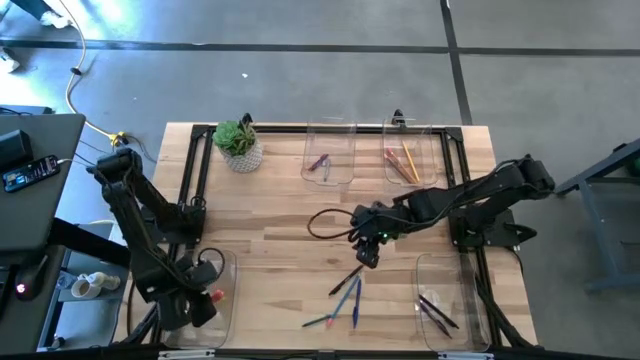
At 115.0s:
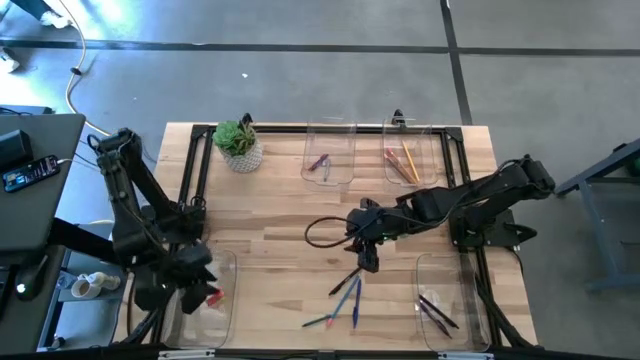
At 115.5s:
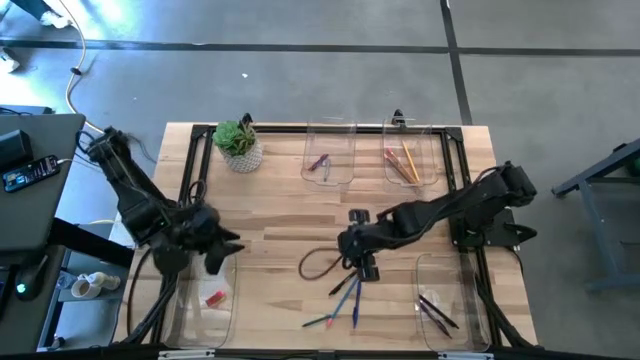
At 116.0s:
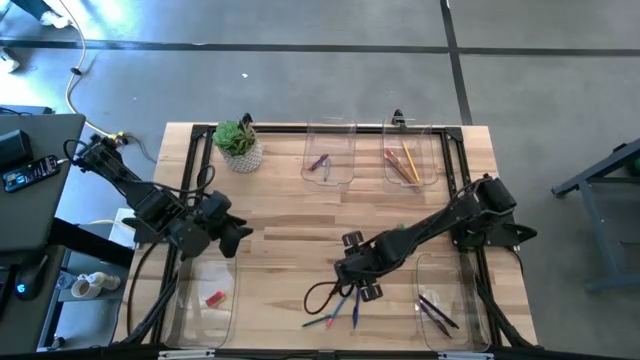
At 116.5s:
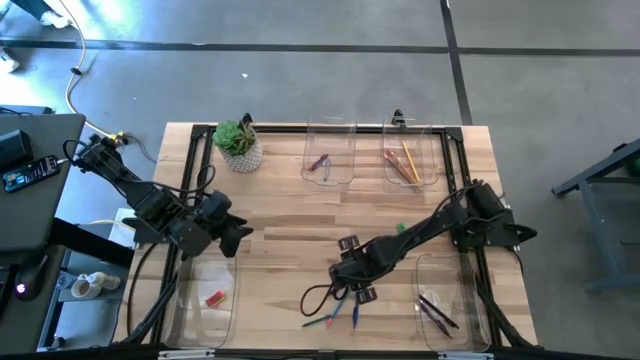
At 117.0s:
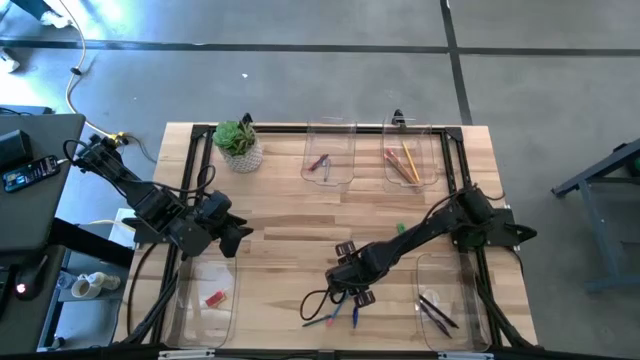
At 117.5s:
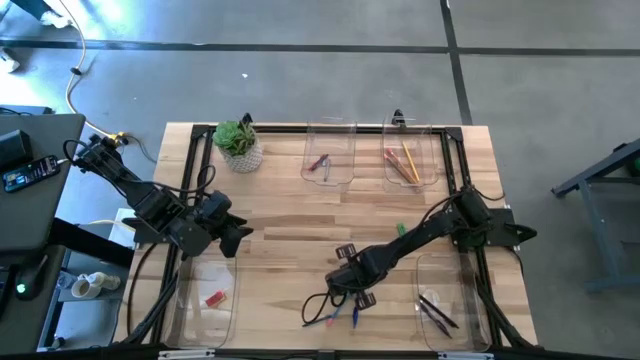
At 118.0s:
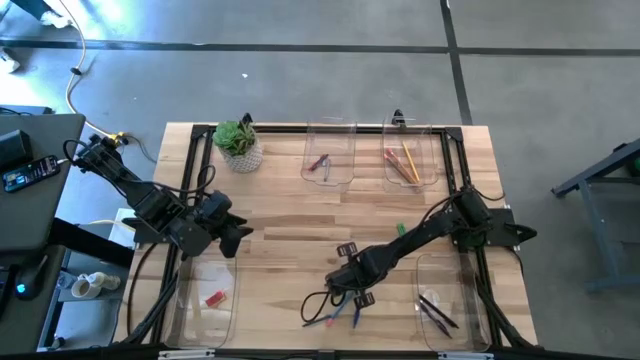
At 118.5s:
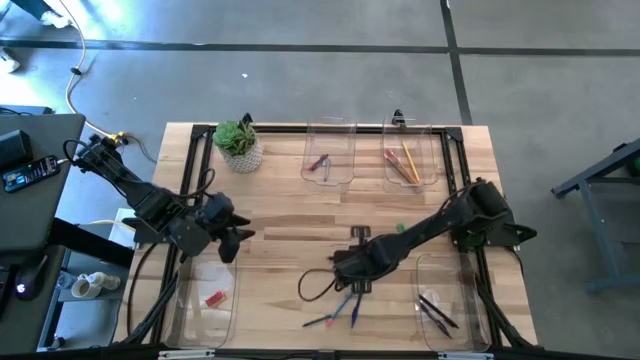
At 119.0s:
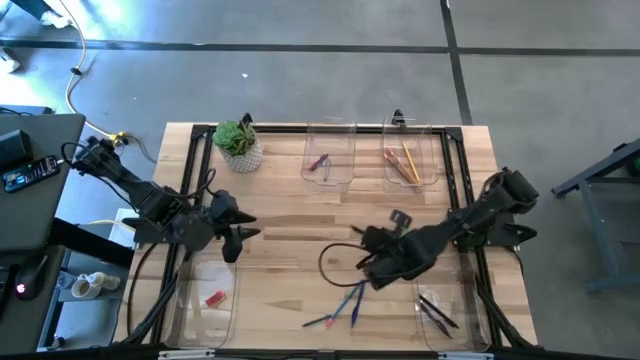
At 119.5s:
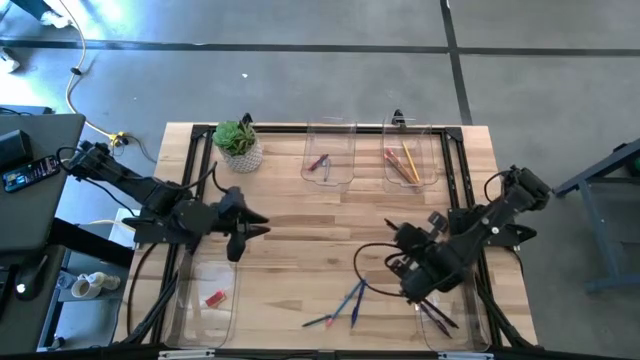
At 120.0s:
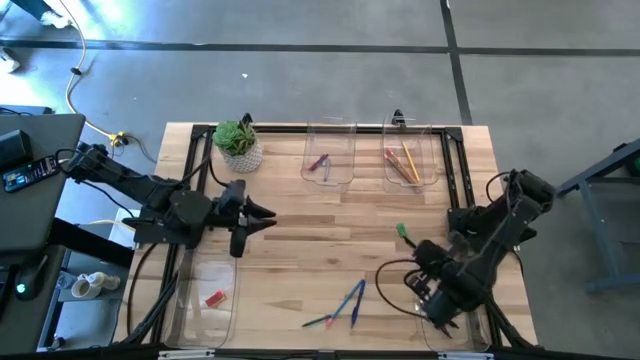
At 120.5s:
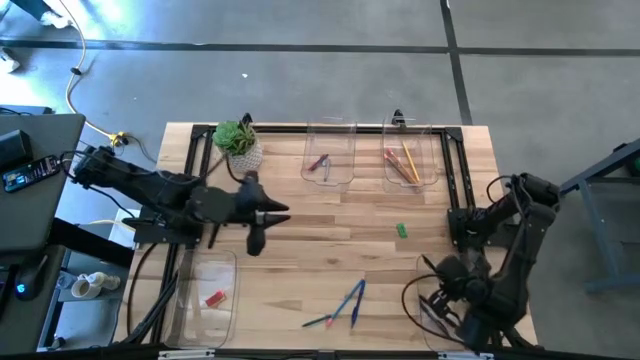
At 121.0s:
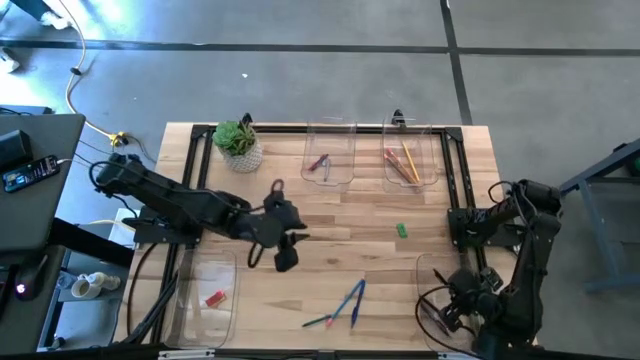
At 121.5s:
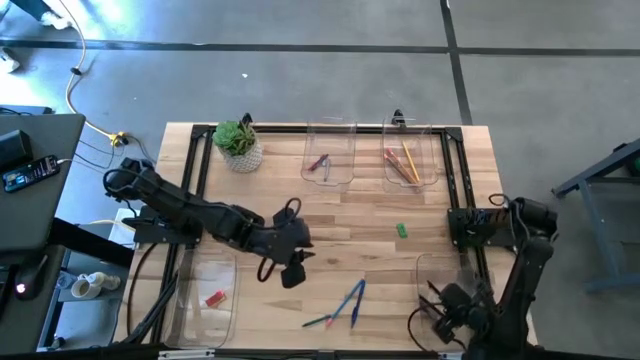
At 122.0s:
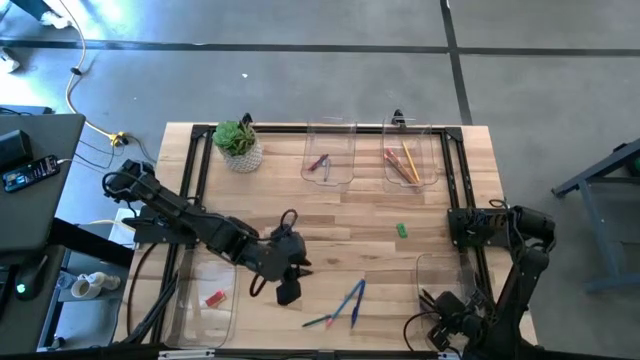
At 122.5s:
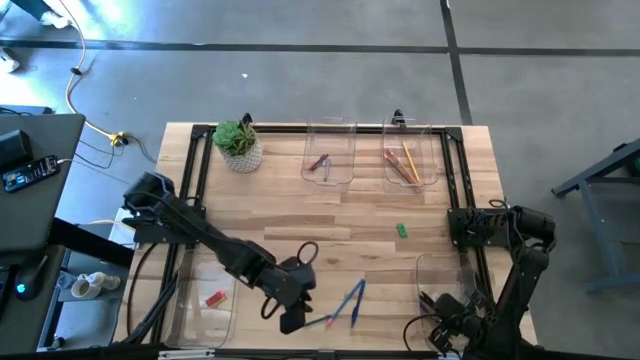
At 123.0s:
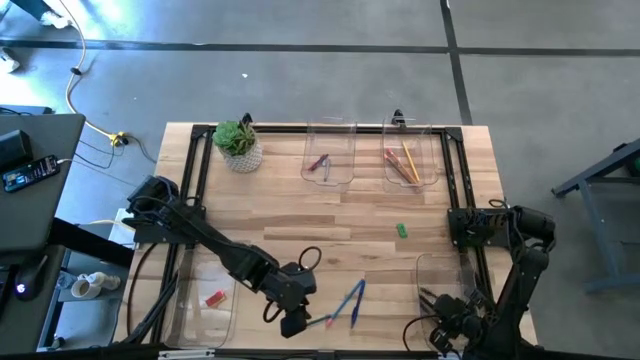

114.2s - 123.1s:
Task: Sort crayons/erasers/pens/pencils in bins
Put the black pen into the bottom right transparent bin

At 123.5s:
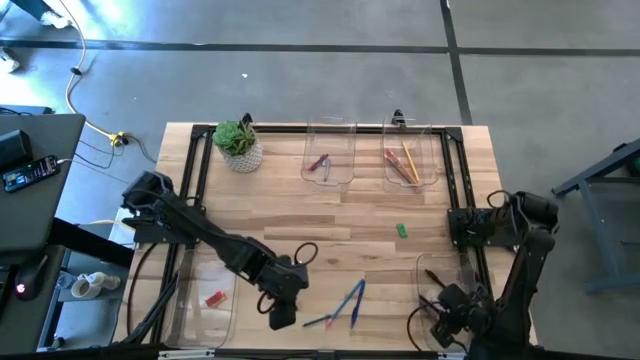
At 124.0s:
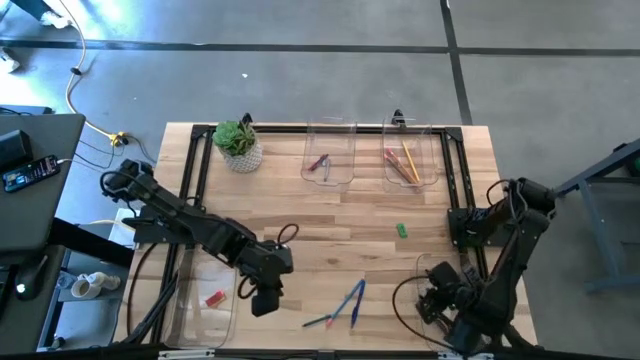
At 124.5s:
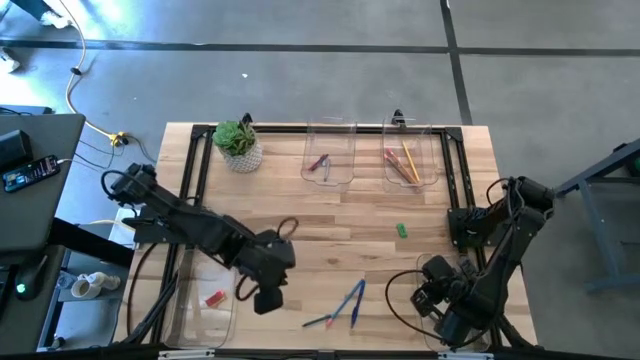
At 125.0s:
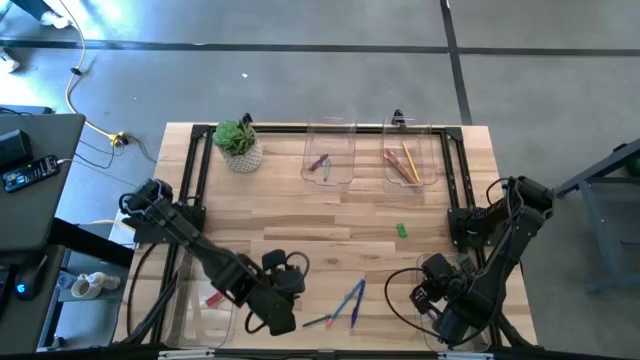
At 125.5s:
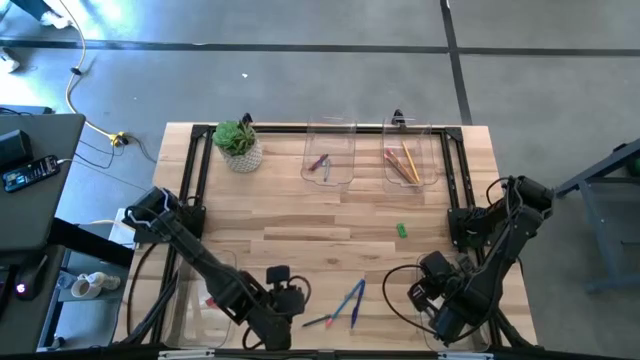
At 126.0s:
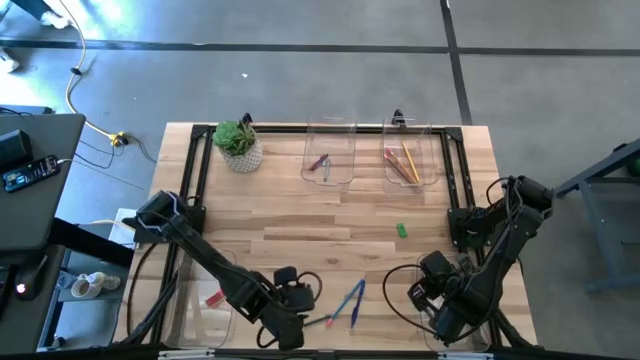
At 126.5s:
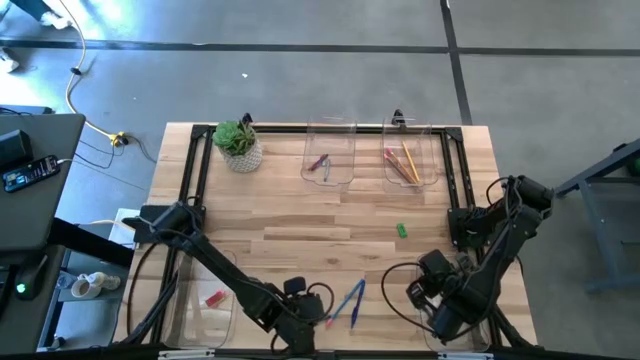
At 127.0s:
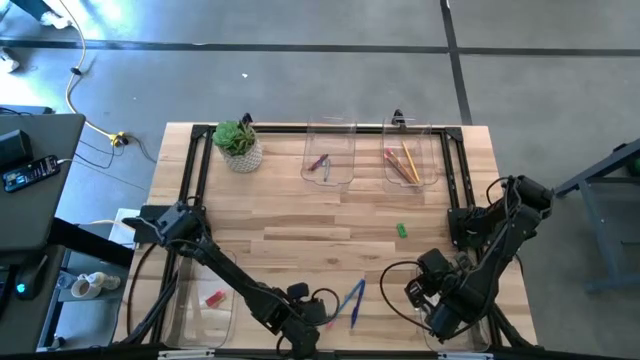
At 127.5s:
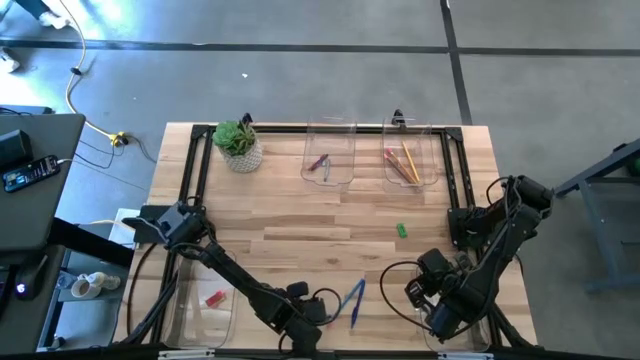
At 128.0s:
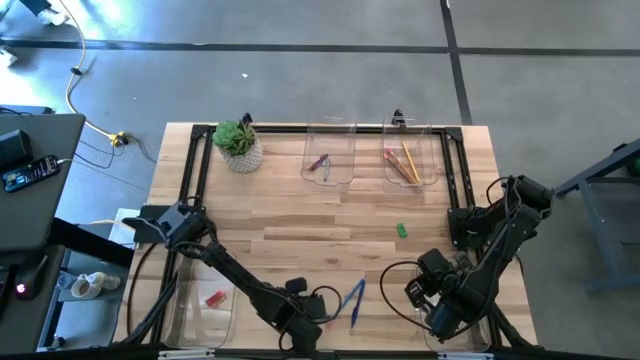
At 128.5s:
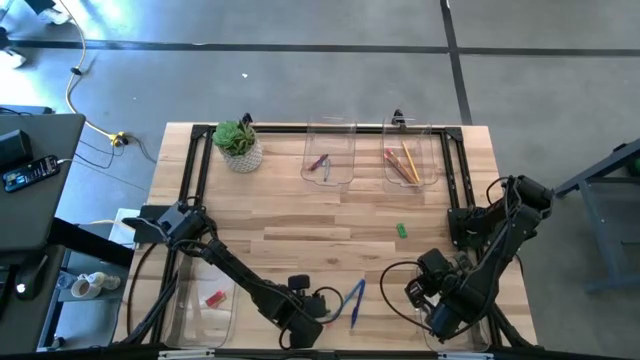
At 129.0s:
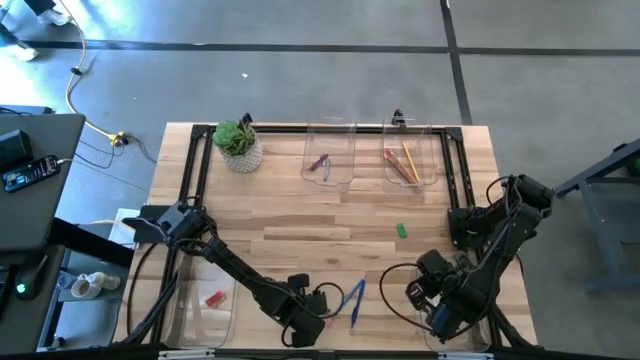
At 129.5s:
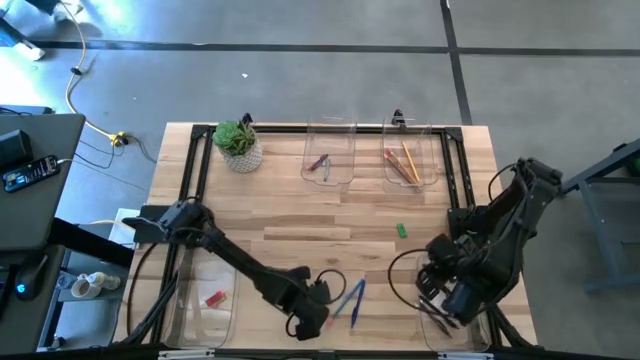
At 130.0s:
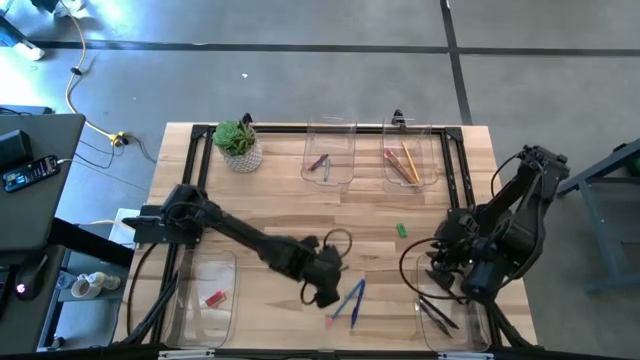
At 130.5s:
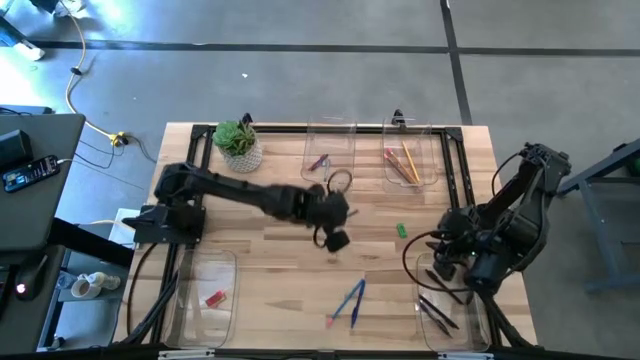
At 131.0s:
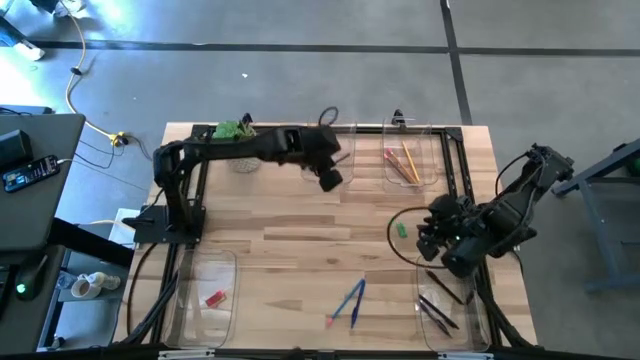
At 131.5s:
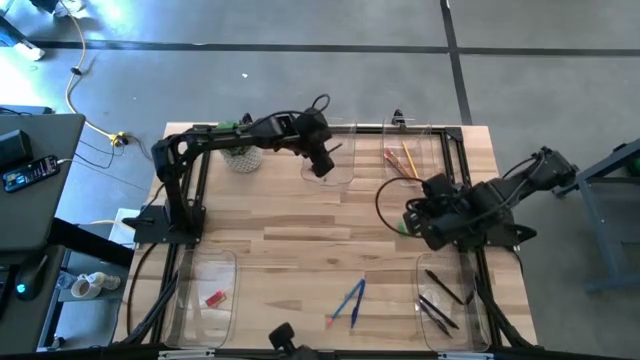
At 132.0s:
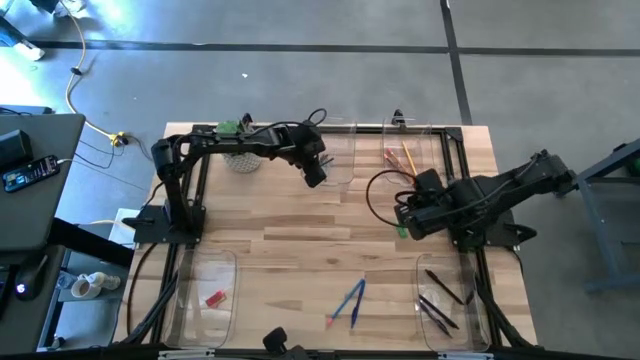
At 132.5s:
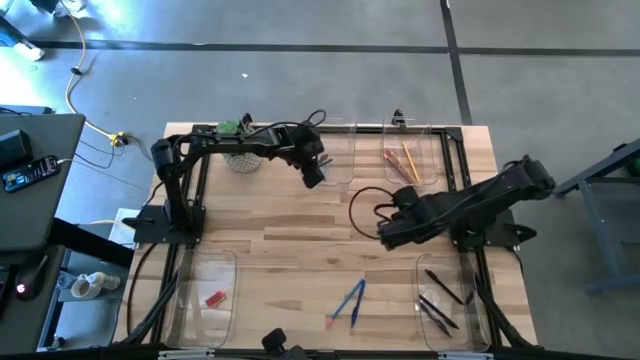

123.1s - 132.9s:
Put the dark green crayon into the top left transparent bin

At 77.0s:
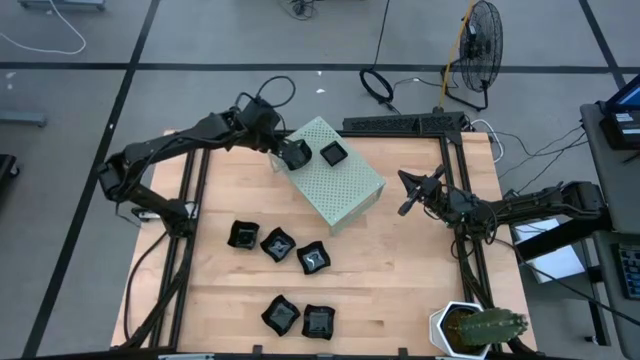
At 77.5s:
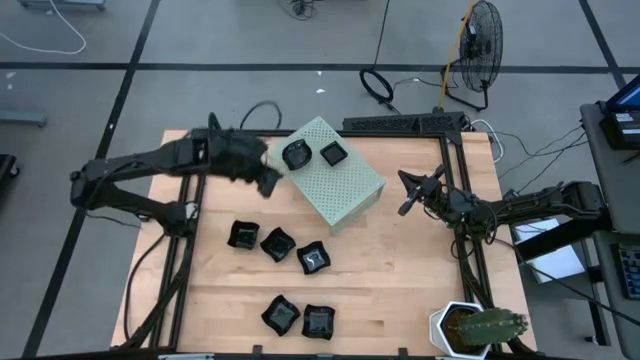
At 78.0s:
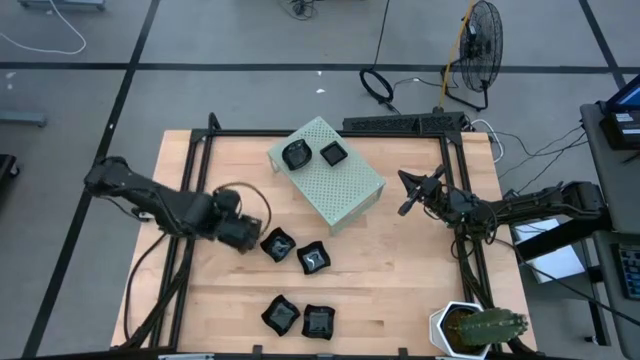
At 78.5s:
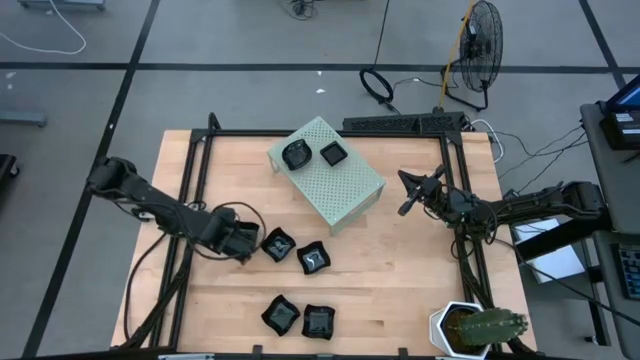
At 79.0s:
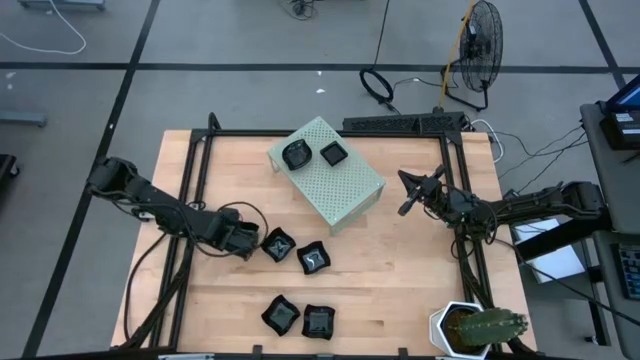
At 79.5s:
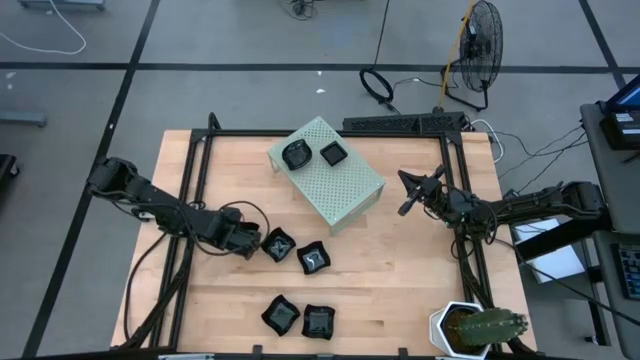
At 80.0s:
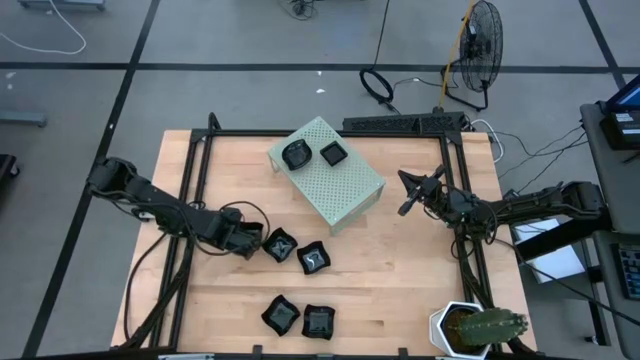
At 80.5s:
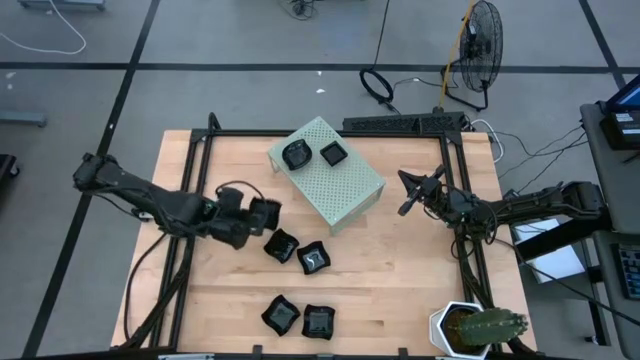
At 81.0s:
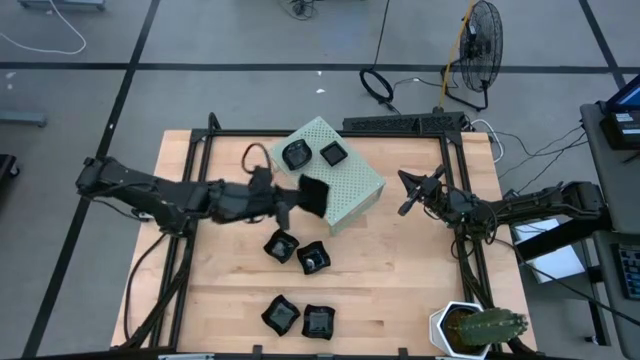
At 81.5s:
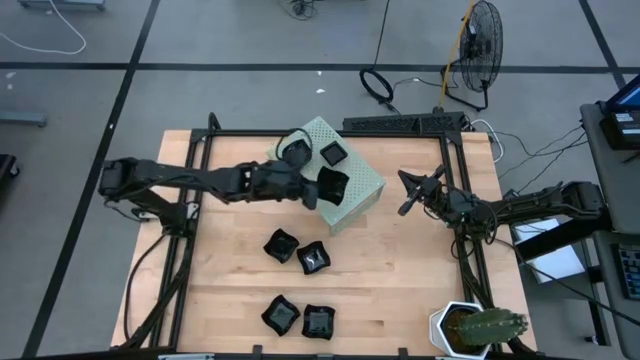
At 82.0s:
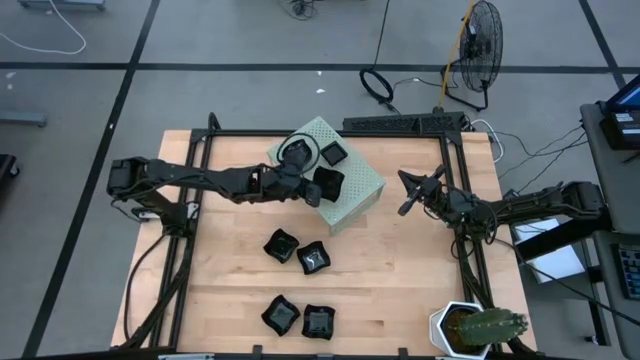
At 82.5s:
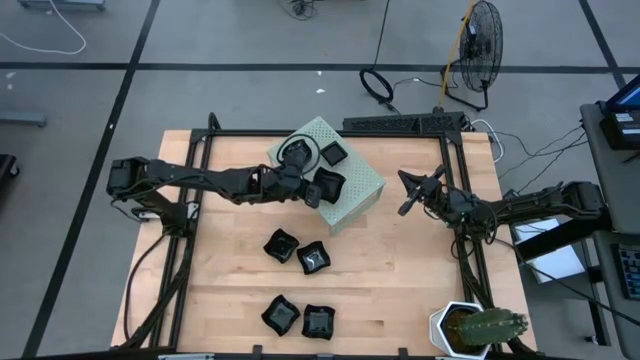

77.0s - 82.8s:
Task: Pick & Place Mini shaped plates
Put the distorted square plate on the shelf
